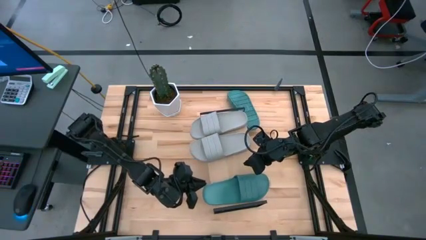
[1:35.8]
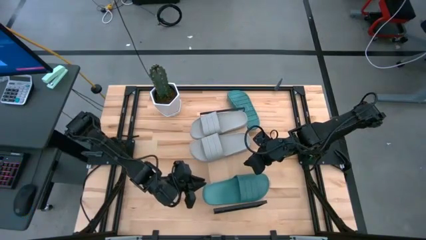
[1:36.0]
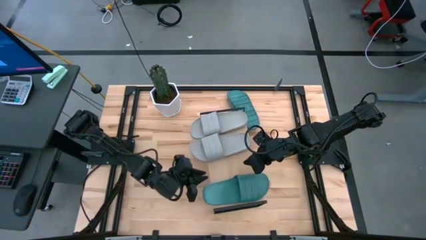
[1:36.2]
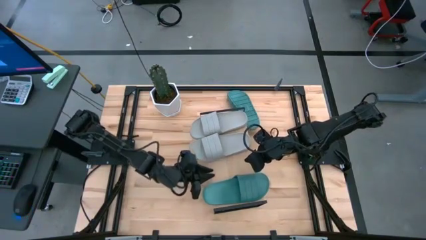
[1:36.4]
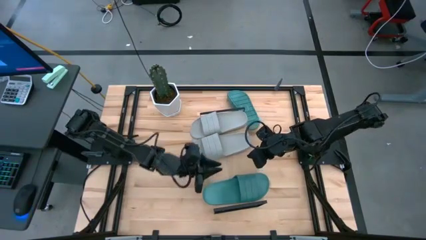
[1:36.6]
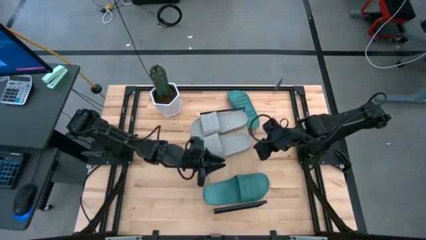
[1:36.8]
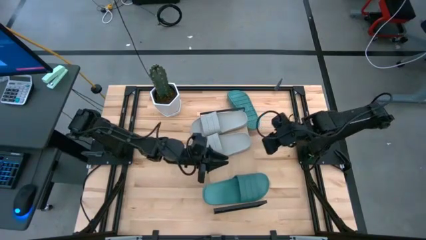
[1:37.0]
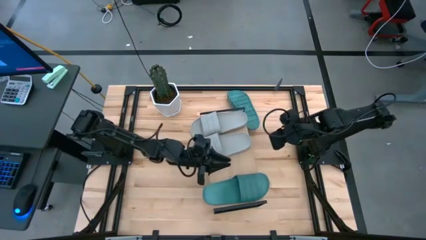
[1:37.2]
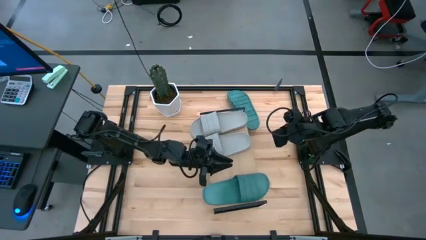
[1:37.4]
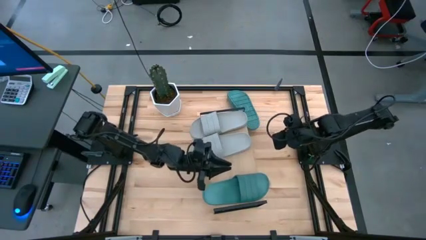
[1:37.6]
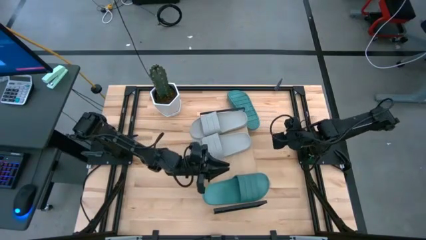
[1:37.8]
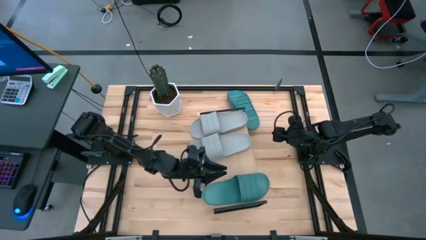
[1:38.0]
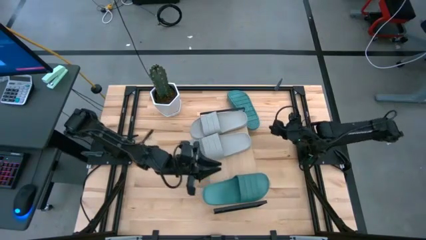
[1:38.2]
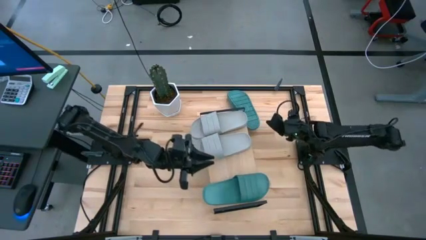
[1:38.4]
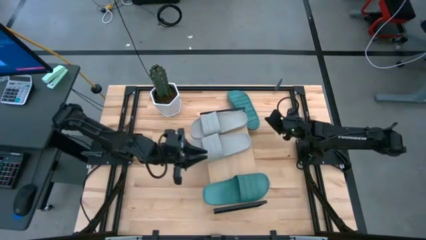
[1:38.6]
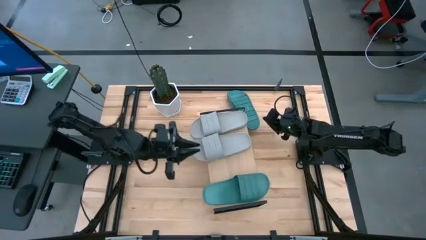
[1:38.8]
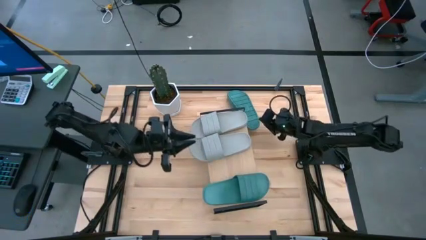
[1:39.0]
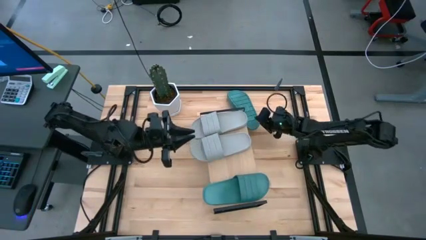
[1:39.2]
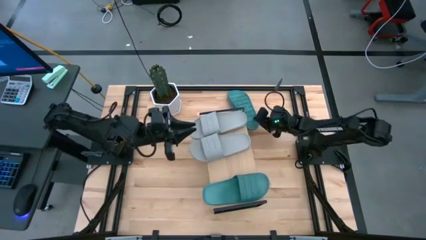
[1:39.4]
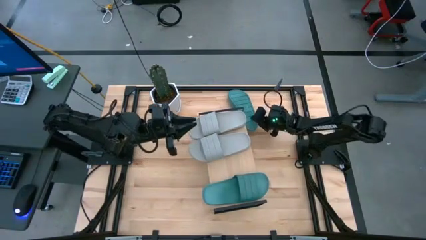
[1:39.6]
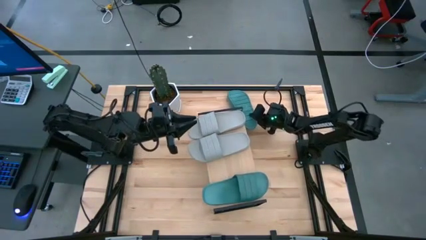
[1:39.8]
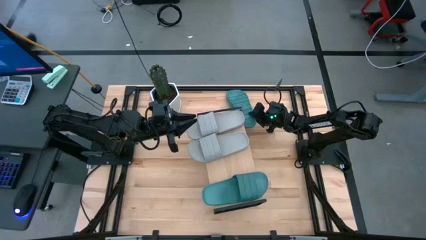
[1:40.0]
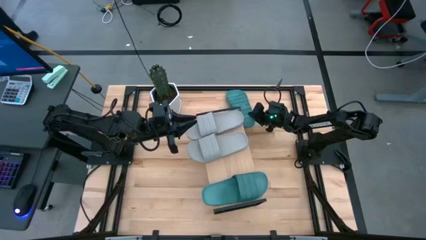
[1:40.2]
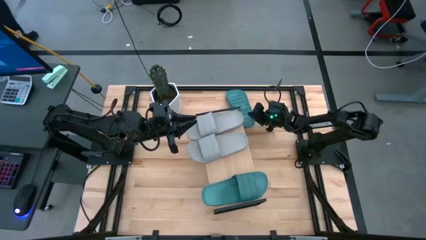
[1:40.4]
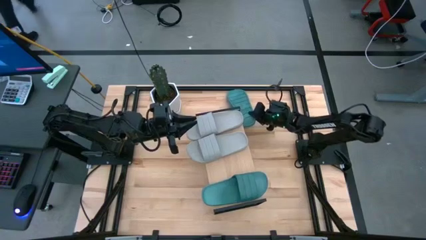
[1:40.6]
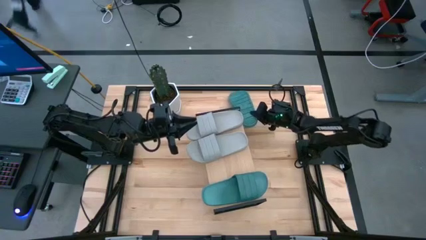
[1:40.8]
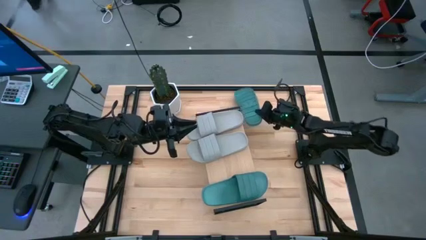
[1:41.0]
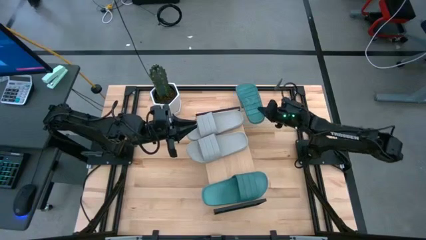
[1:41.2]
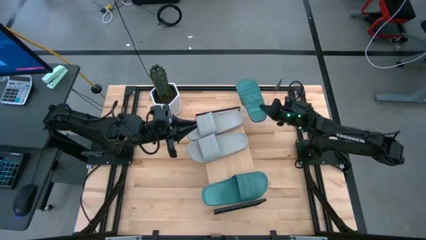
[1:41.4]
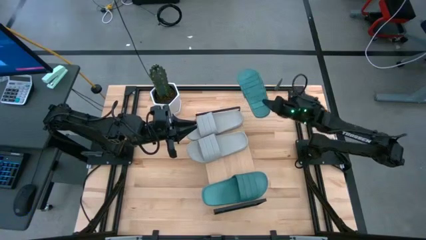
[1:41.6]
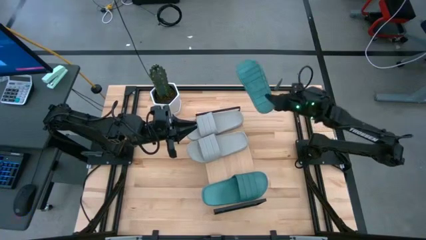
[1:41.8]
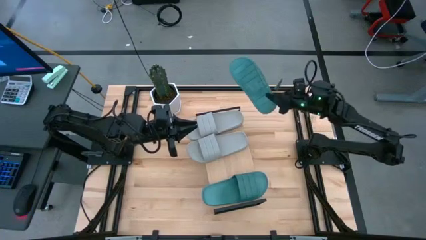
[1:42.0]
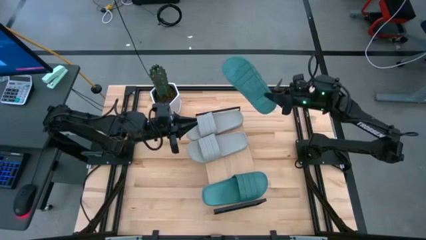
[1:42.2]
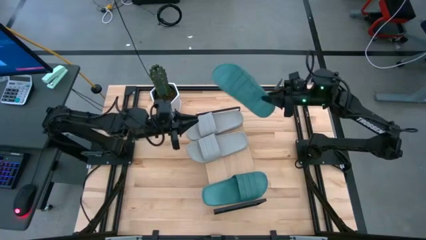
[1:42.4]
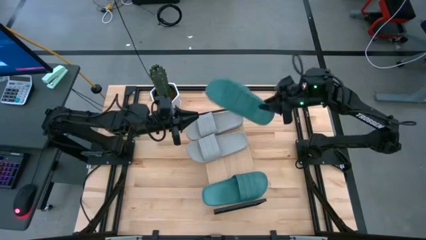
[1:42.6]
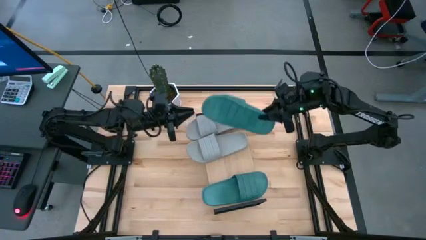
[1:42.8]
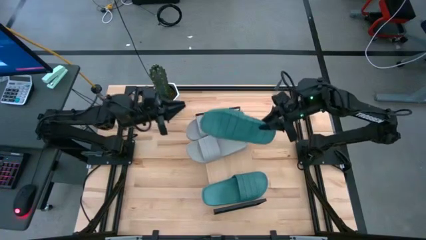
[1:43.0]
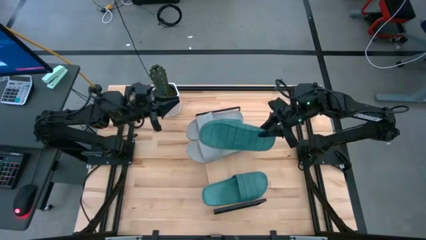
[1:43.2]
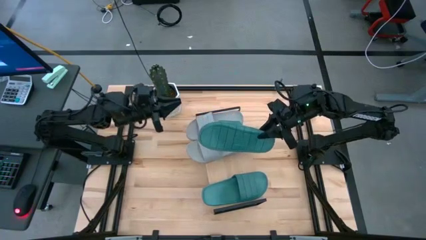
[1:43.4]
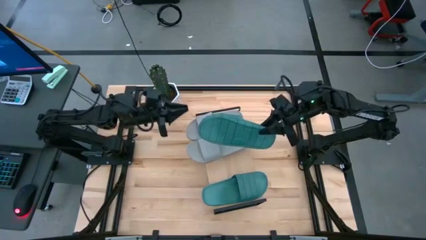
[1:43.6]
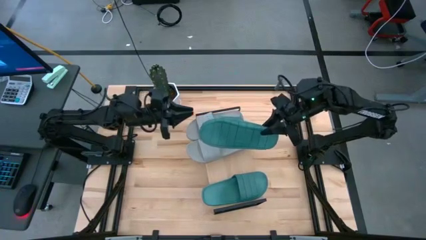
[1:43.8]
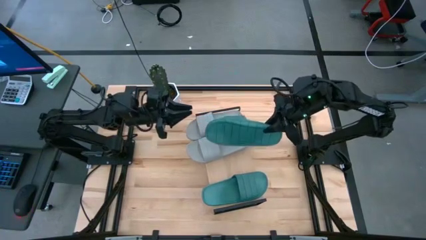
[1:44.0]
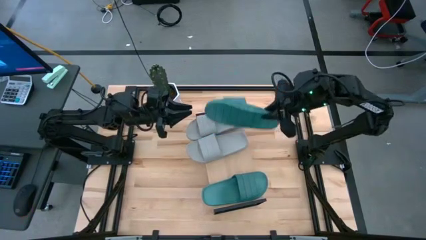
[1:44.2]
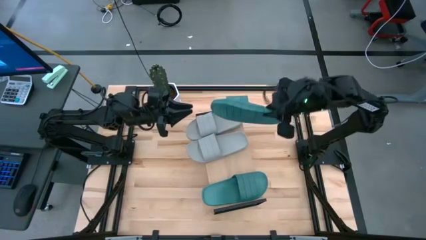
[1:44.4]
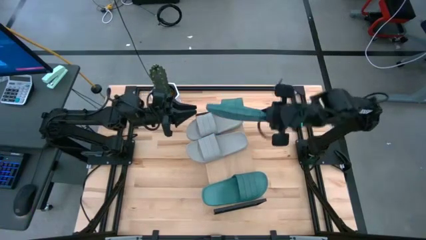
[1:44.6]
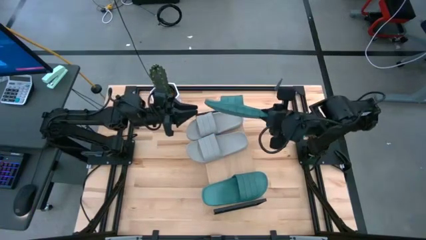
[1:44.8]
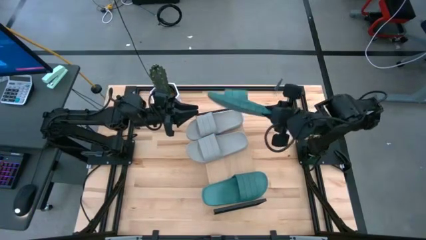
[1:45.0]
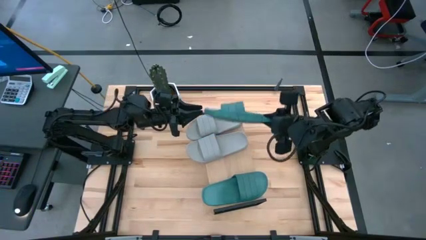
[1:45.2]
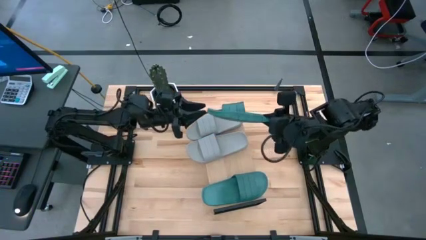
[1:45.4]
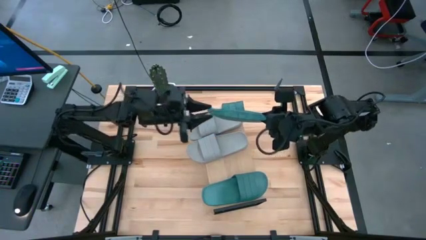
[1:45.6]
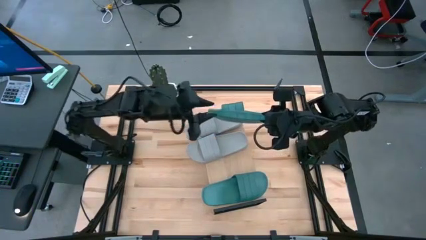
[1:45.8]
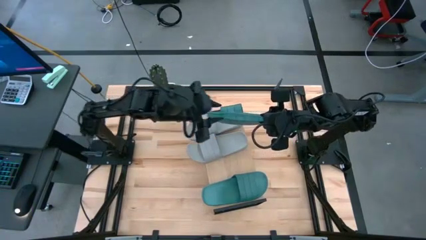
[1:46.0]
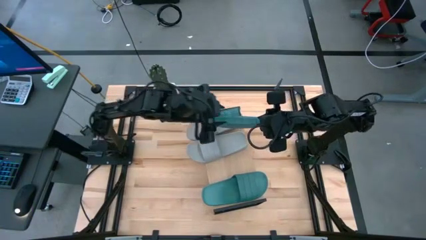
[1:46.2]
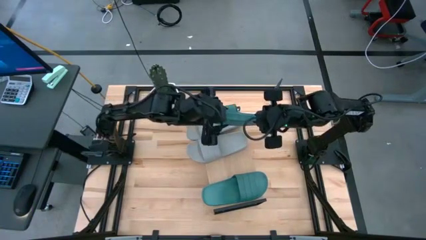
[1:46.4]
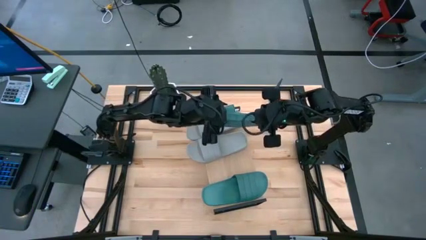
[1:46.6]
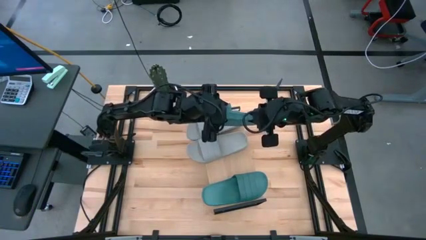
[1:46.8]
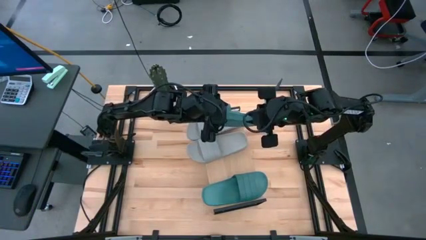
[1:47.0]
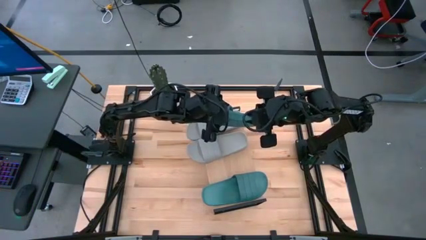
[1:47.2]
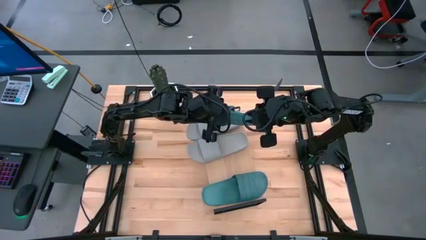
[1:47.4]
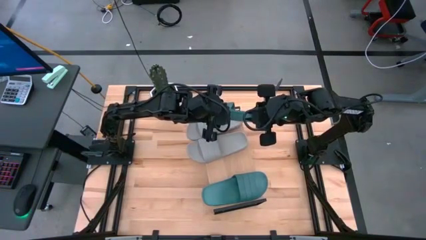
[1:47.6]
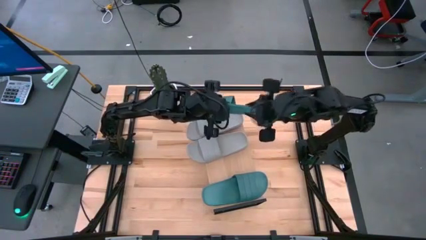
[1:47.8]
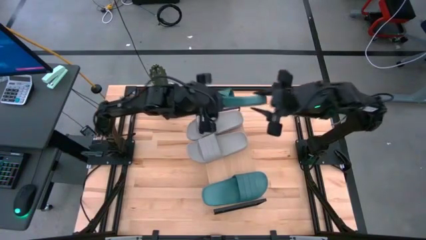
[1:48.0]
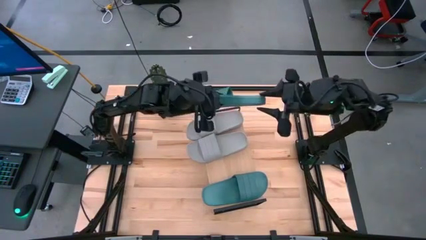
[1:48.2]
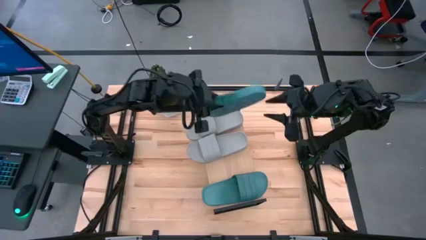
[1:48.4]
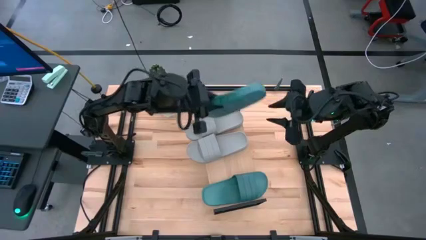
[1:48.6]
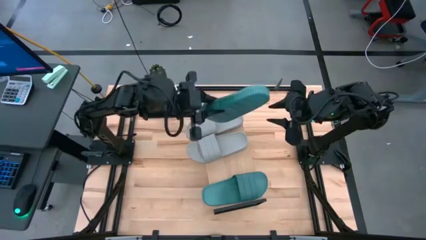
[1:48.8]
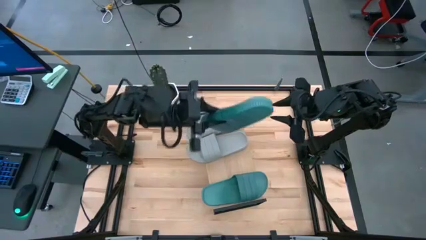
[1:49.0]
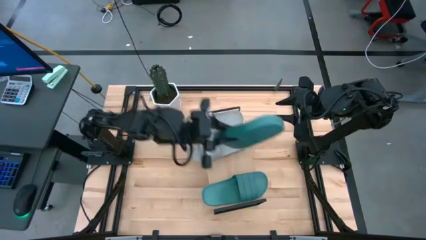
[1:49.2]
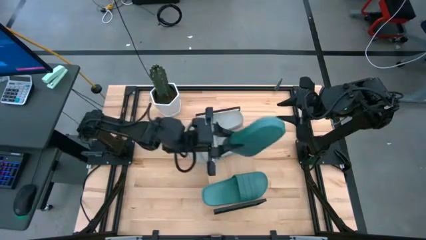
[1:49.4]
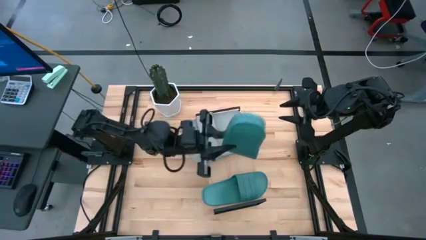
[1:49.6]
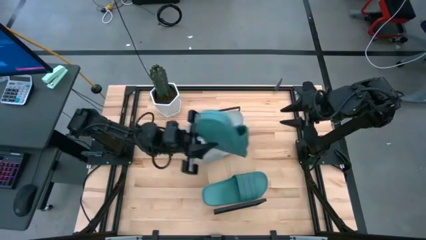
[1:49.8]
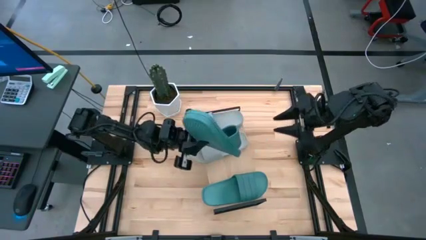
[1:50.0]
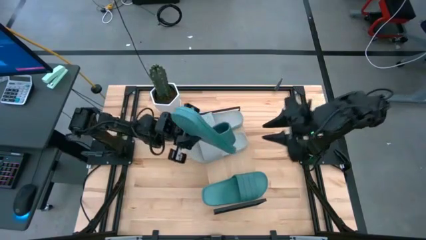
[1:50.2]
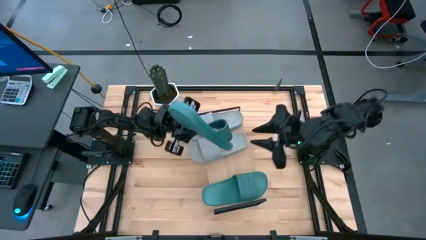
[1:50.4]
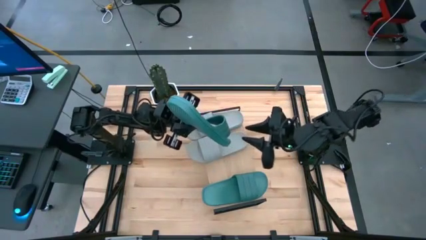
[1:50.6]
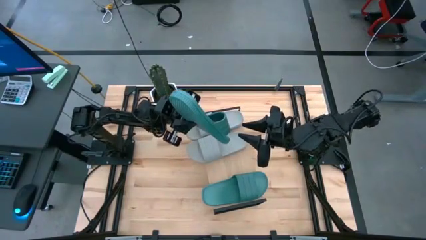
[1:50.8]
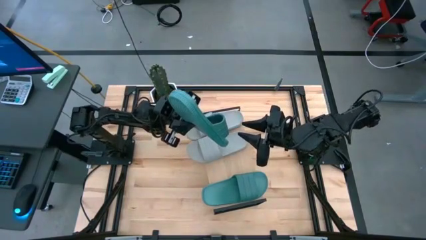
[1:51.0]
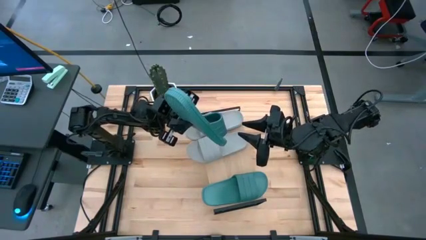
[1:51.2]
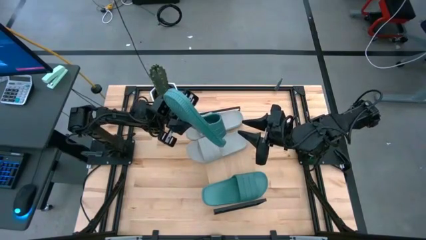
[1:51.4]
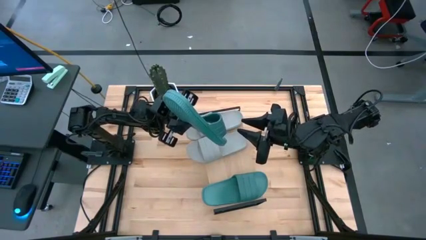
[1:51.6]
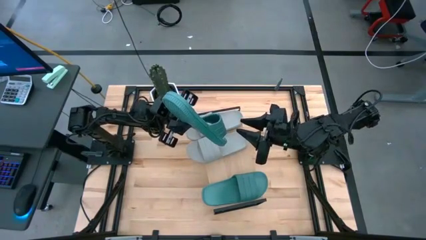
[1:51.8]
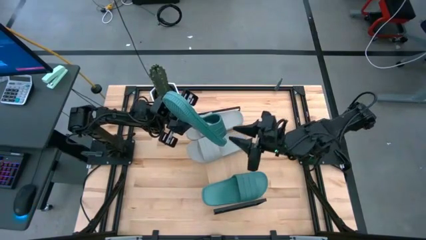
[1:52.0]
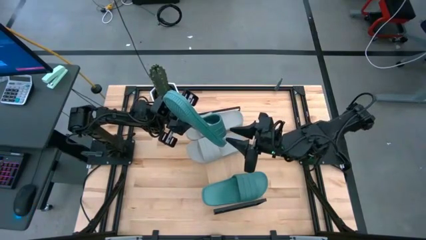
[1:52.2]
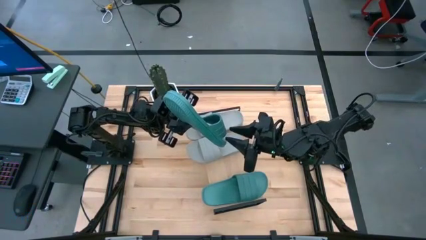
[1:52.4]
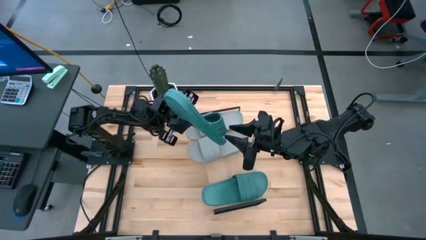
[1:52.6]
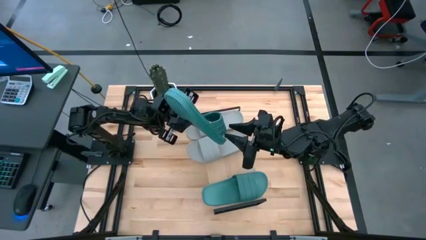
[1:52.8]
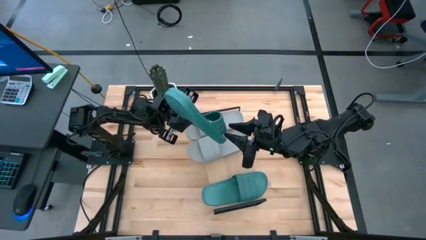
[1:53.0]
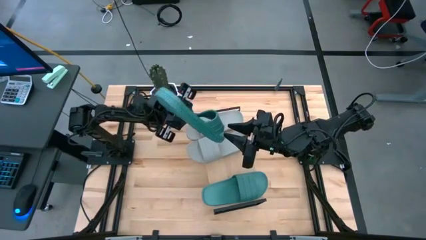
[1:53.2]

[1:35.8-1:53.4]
Task: Pick and place slides into the shelf
Put the green slipper on the shelf
